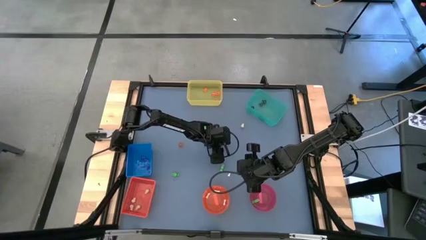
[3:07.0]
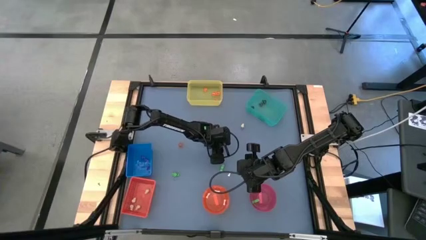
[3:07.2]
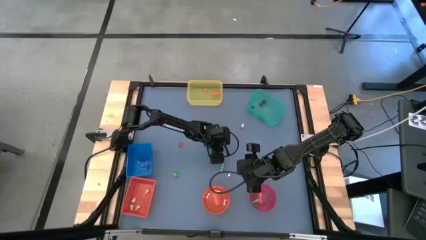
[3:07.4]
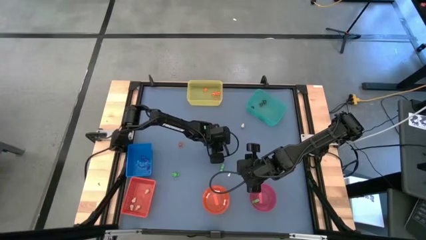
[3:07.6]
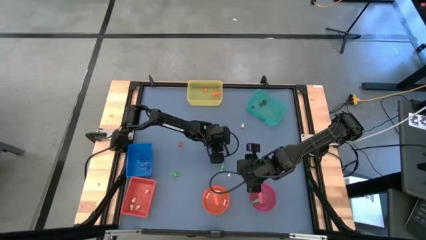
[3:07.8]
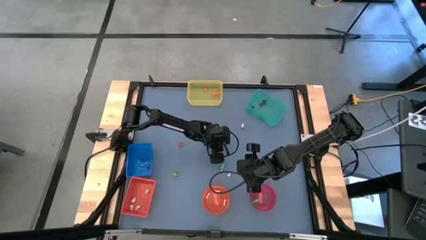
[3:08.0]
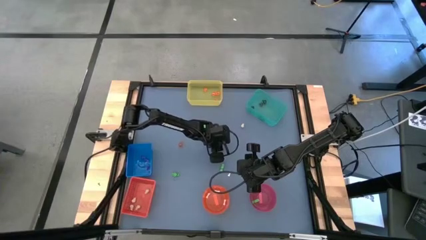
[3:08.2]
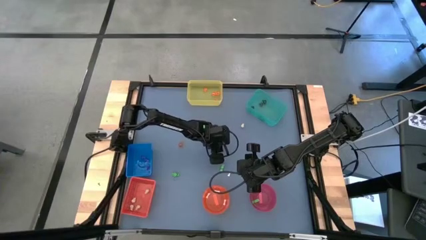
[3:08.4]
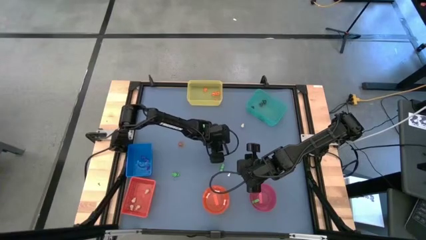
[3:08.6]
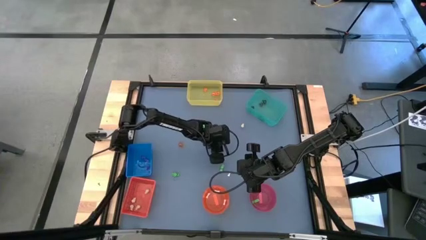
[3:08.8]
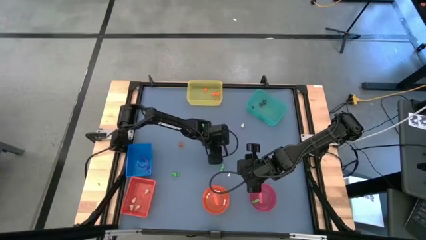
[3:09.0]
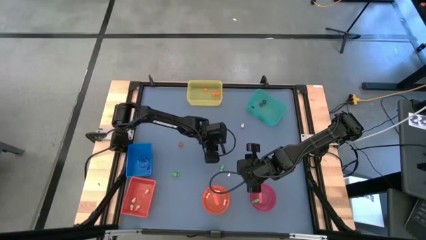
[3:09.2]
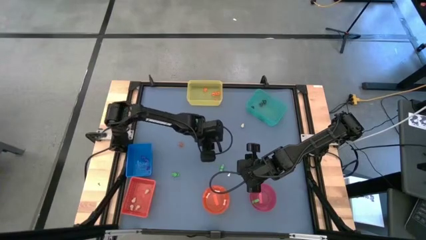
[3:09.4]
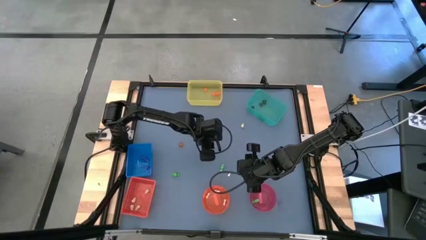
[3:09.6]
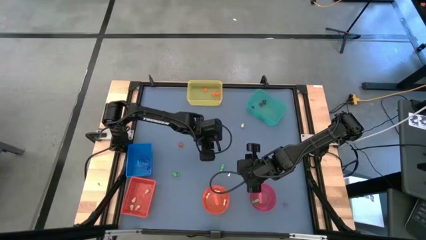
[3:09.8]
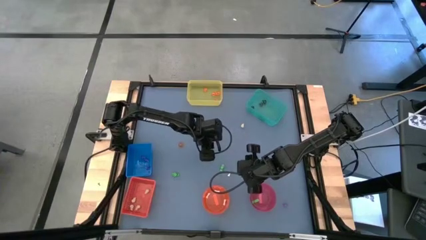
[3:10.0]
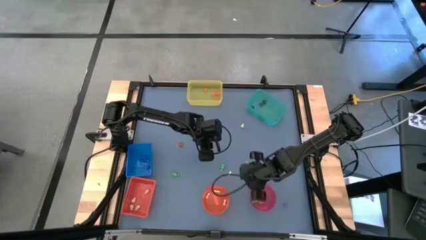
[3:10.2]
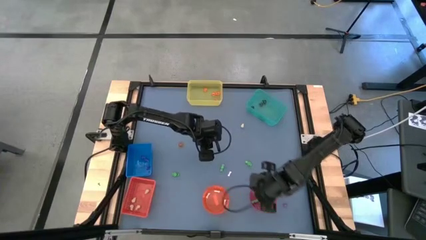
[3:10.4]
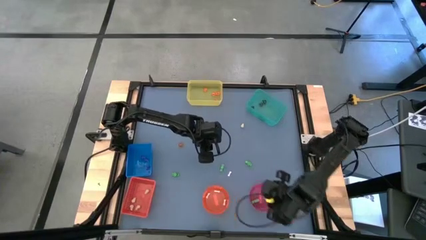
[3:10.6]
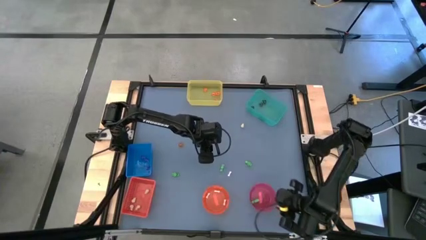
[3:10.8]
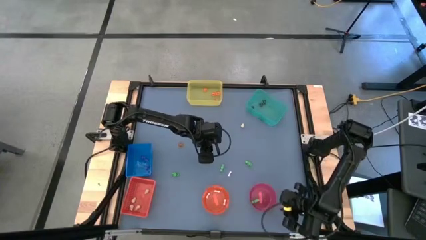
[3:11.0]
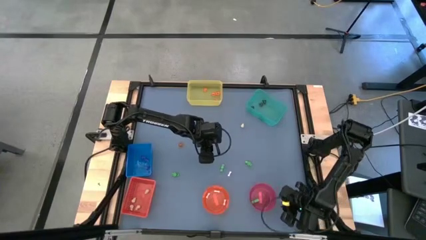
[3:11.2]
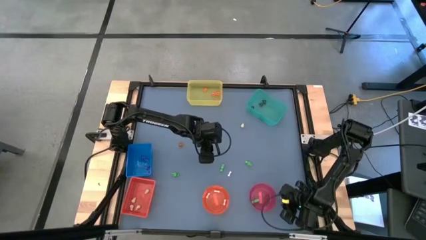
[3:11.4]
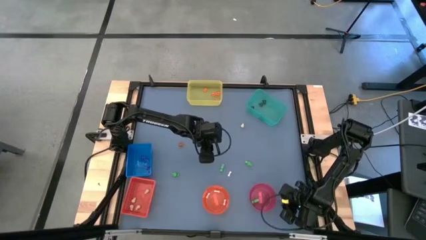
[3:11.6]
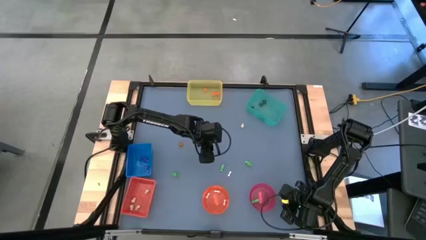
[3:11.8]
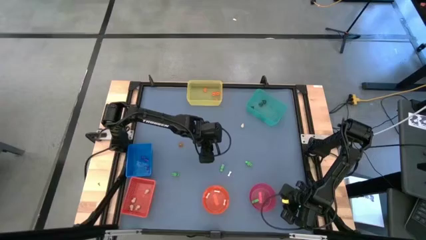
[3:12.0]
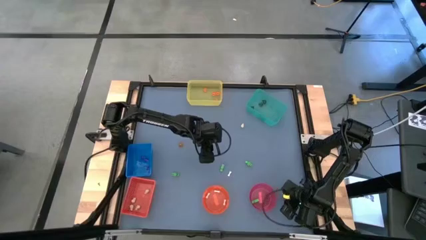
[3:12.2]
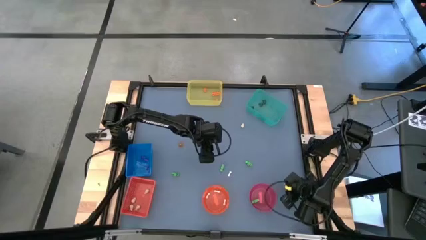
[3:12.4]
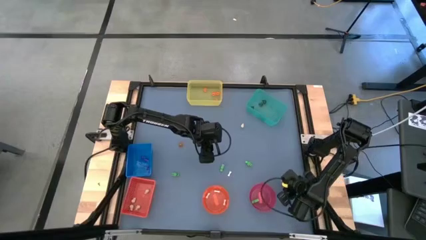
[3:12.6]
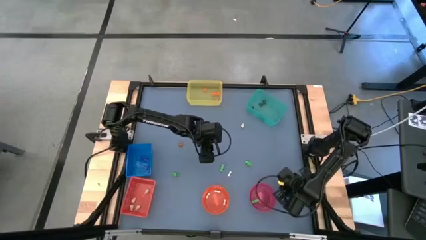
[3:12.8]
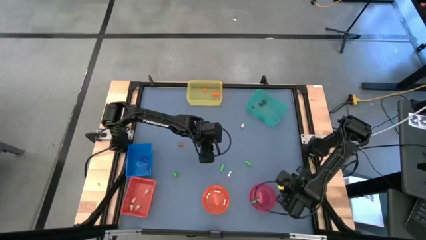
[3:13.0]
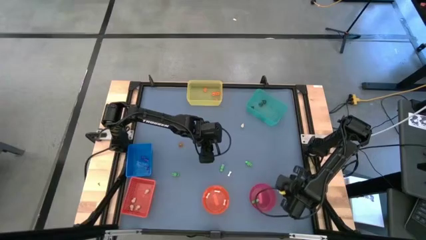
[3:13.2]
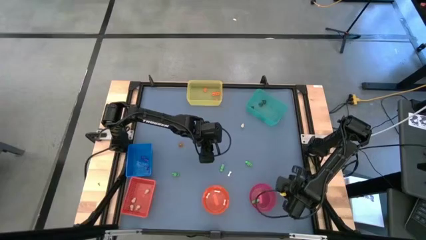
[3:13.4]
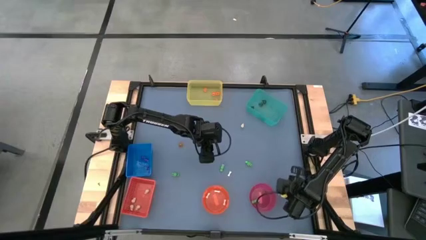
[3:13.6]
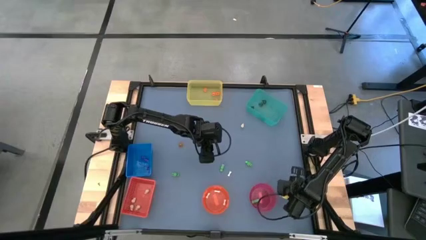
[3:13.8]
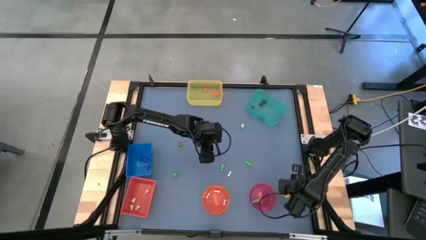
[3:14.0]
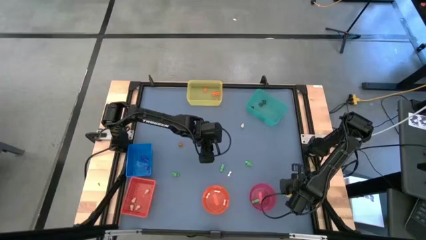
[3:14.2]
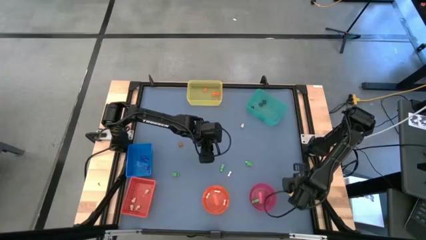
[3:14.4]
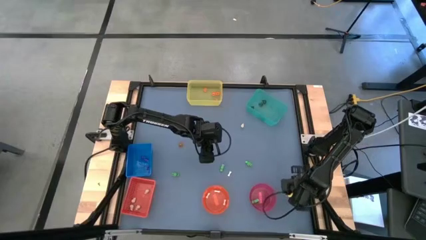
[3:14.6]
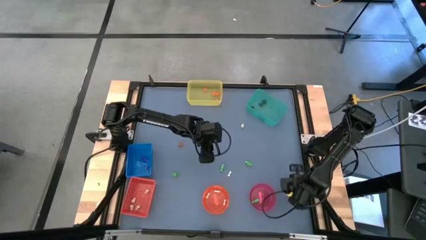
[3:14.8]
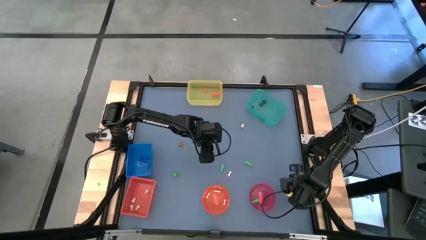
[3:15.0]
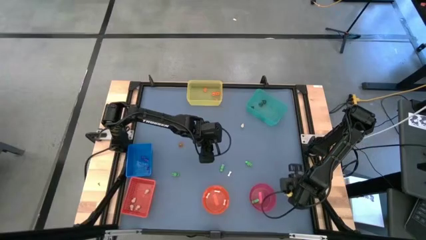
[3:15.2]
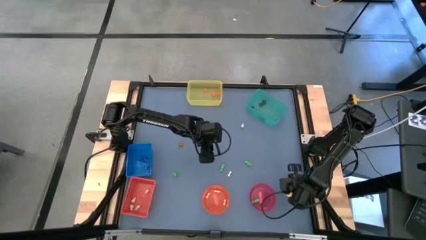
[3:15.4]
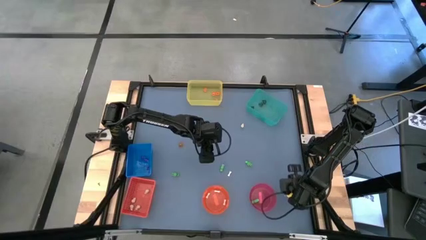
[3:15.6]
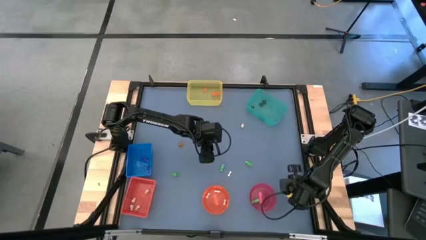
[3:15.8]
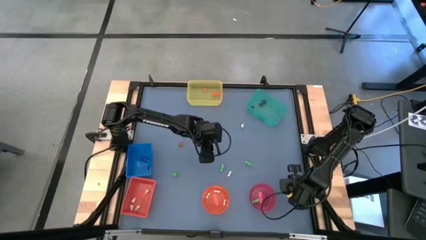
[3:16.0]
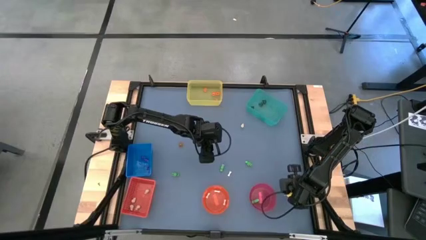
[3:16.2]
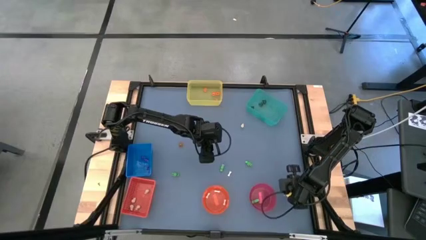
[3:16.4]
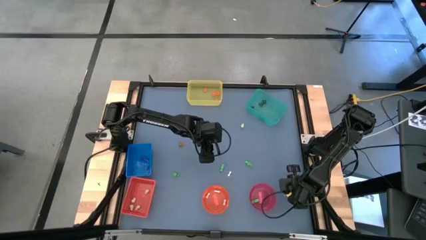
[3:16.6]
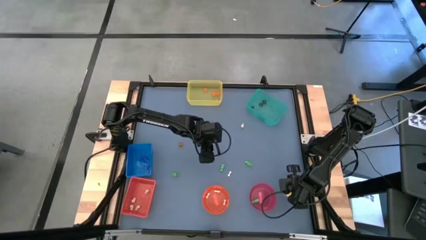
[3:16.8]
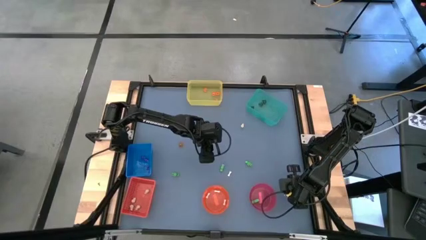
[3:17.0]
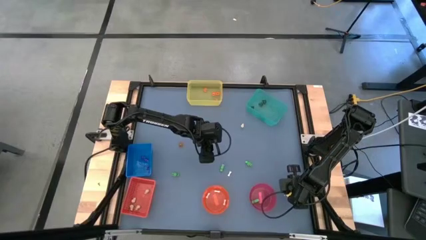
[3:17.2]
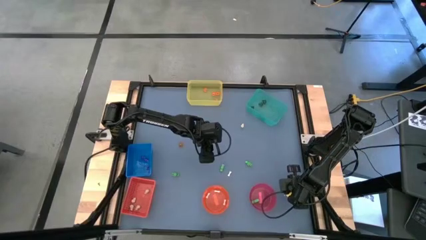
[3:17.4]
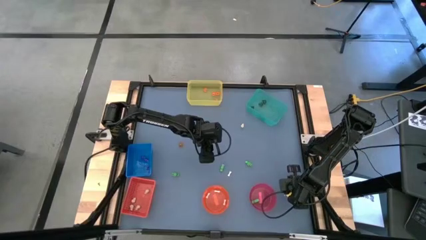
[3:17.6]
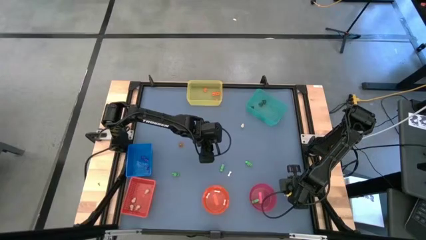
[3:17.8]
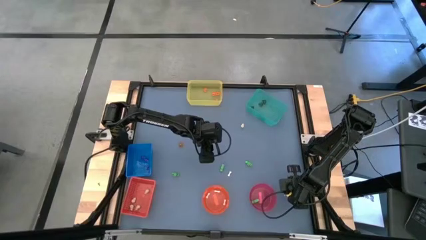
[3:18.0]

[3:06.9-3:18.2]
Task: Sort Halloween decoration
Put the purple witch hat toy into the blue bin
